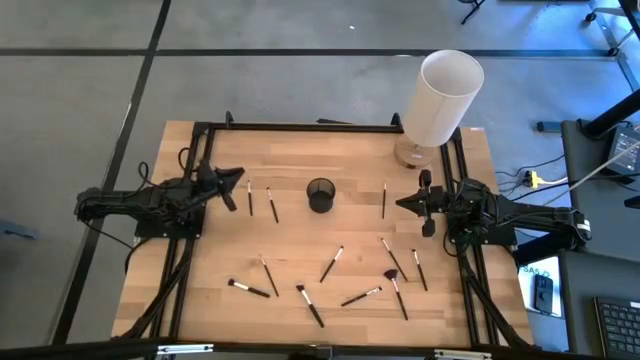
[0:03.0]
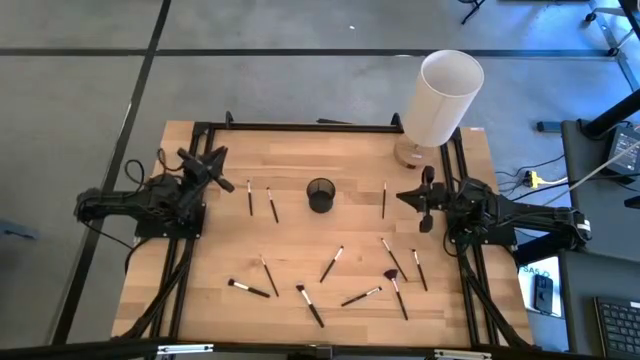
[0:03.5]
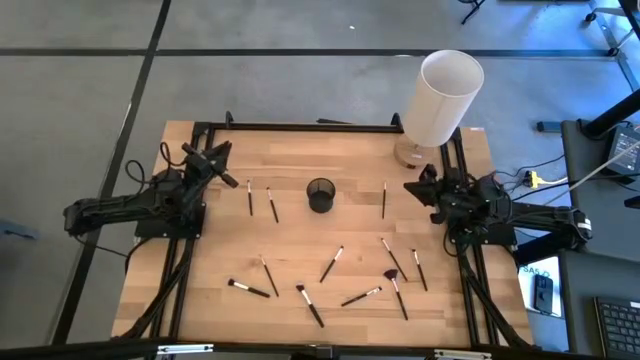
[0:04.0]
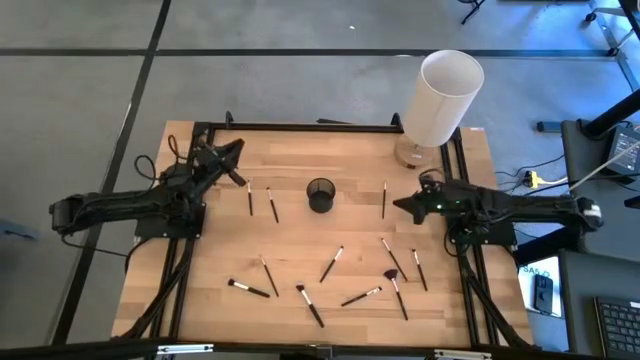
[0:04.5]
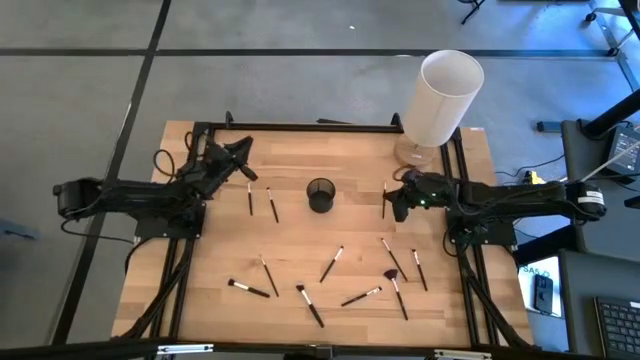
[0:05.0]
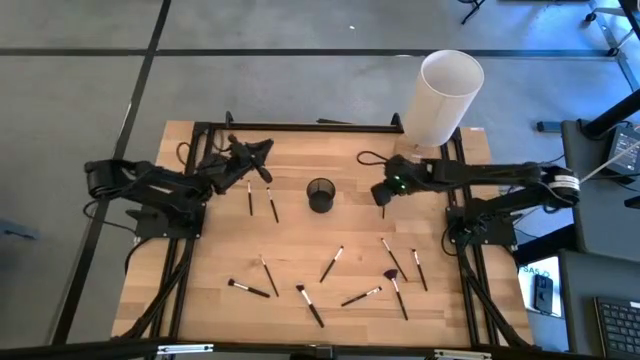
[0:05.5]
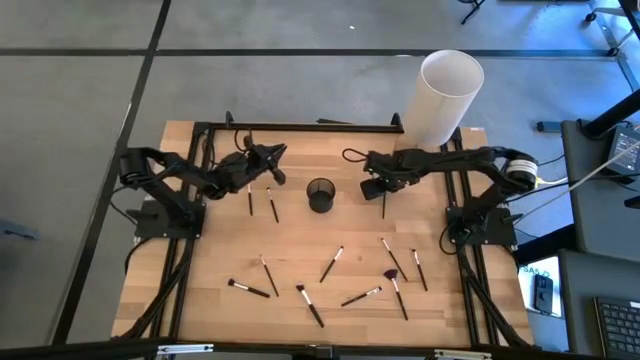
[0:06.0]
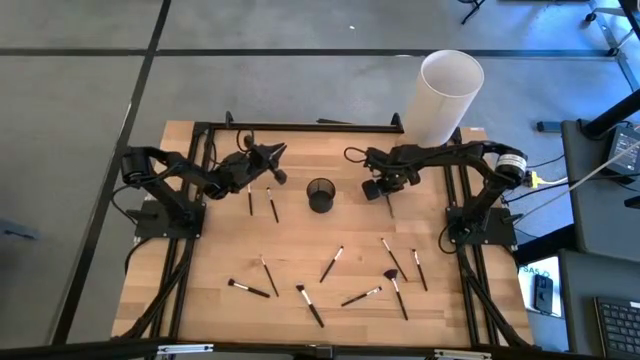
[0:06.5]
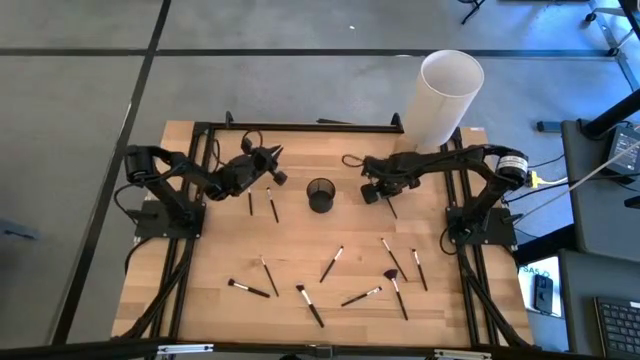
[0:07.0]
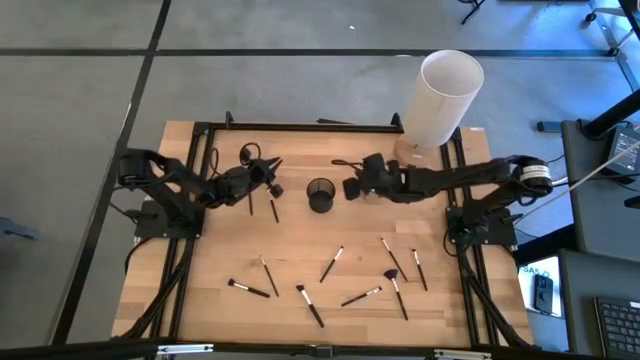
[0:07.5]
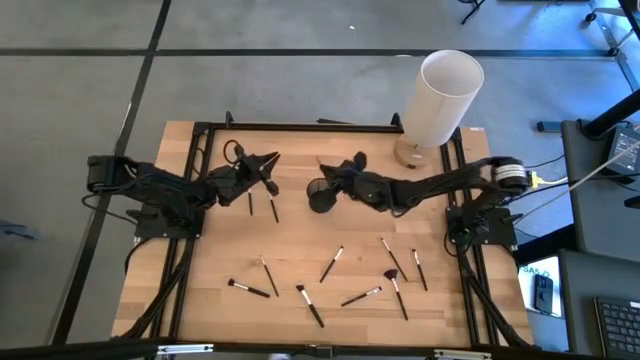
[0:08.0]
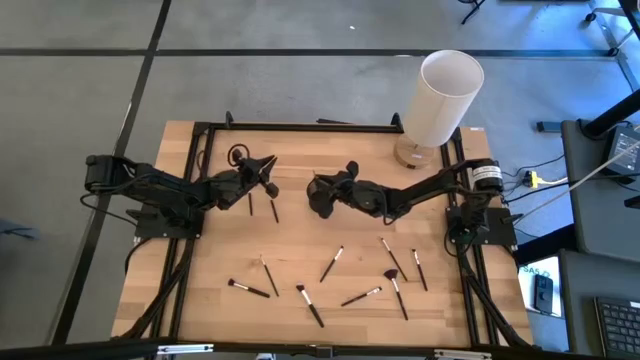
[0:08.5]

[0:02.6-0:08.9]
Task: Sort items
Put the eyeshadow brush into the organizer

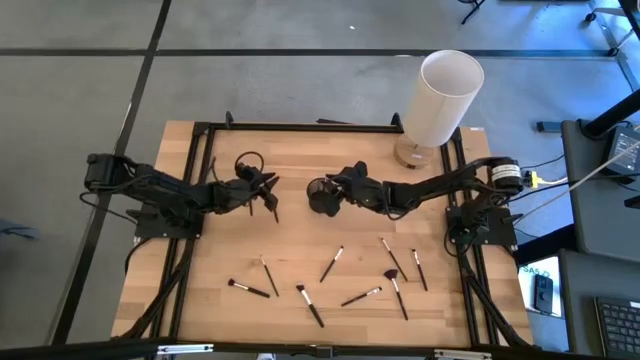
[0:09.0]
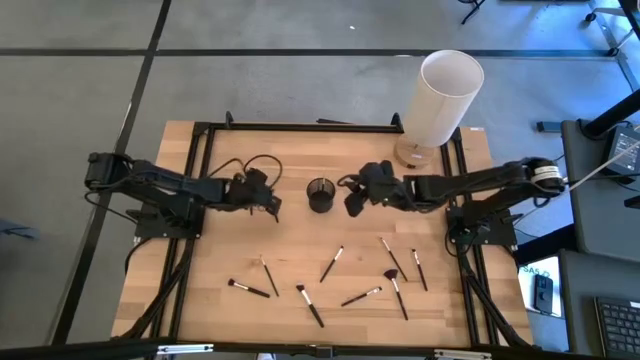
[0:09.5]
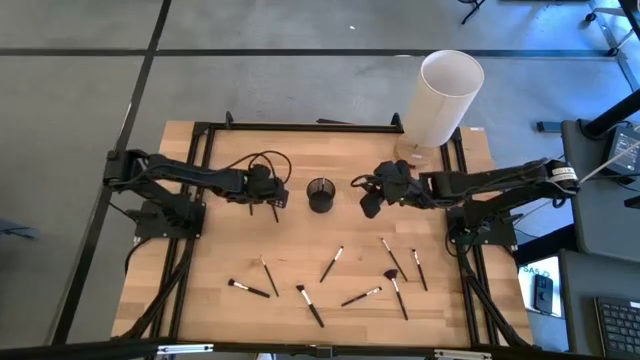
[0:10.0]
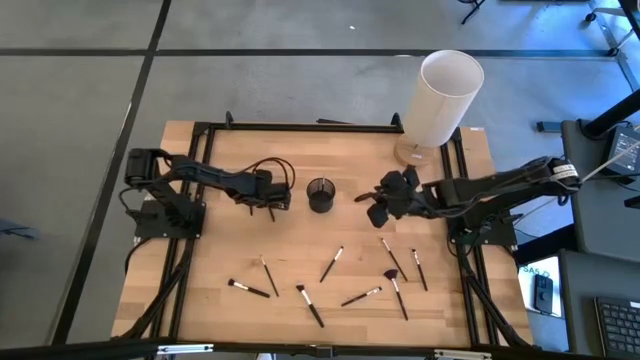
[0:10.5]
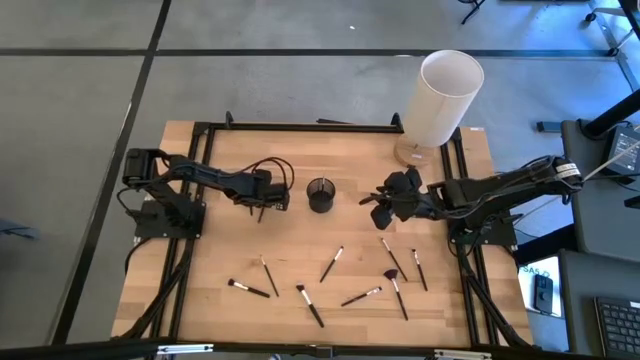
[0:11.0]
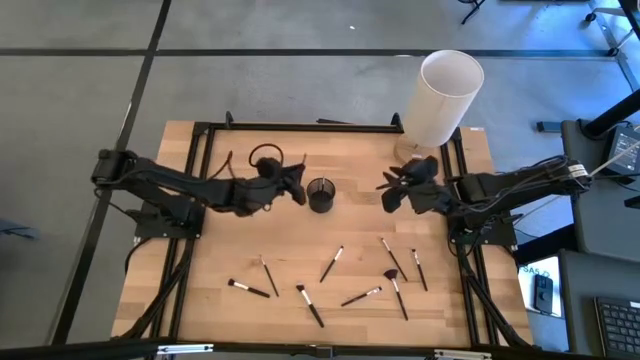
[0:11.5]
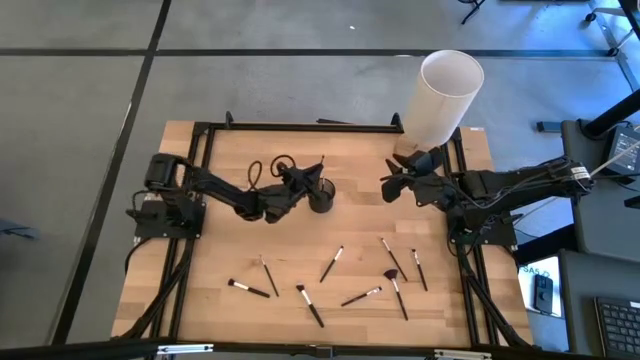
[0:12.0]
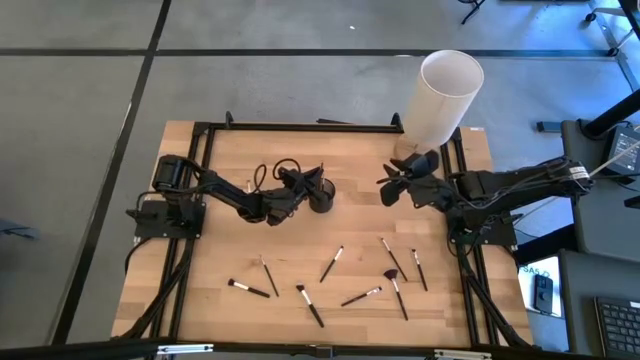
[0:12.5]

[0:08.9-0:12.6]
Put the eyeshadow brush into the organizer

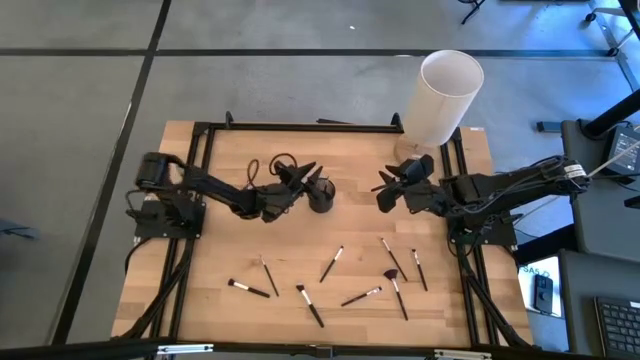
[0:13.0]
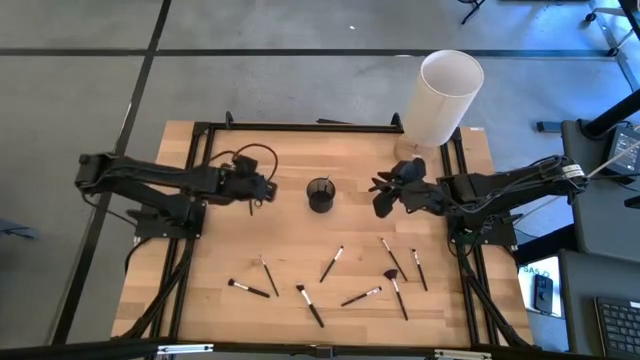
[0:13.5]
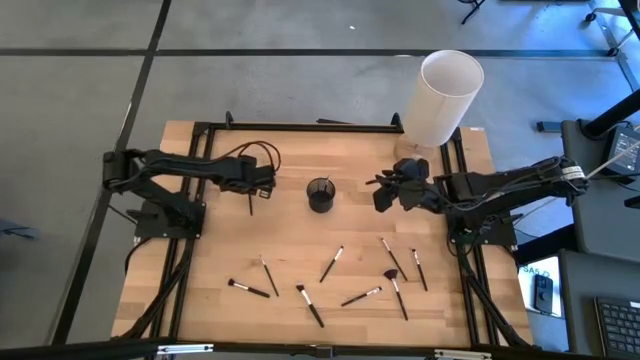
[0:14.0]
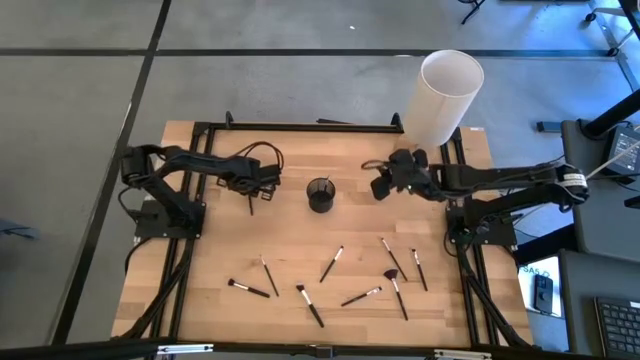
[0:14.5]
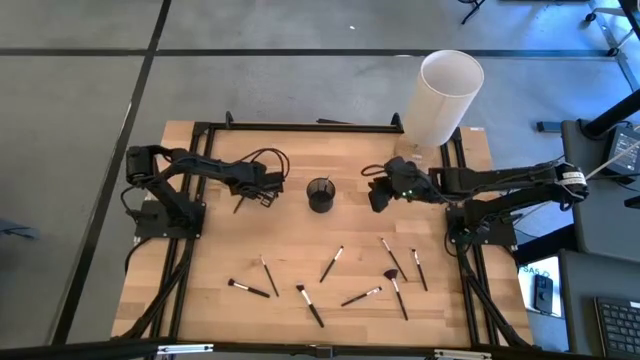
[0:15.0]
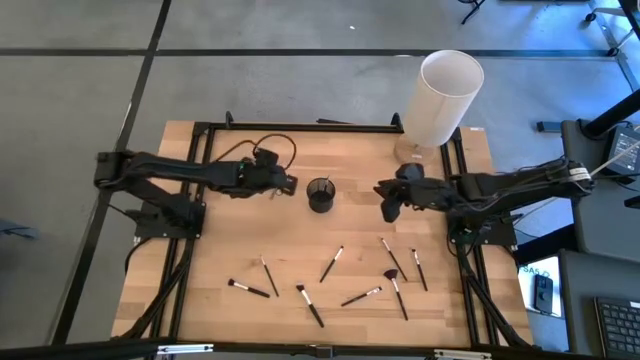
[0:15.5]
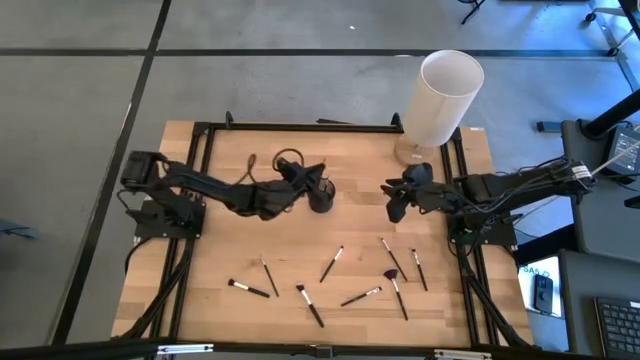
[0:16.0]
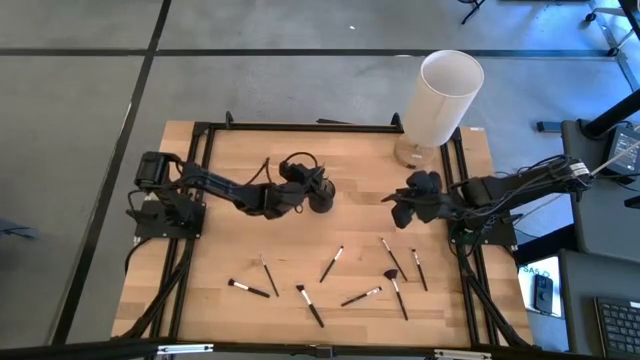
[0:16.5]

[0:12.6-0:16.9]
Put the eyeshadow brush into the organizer

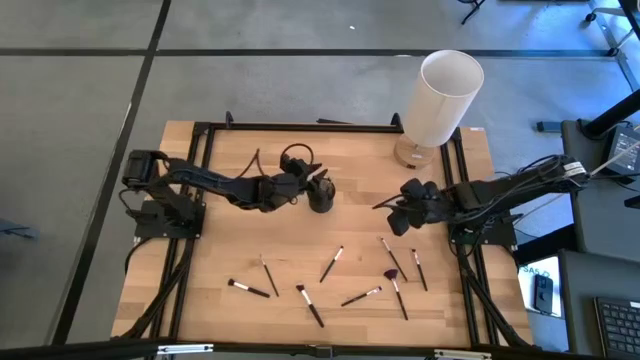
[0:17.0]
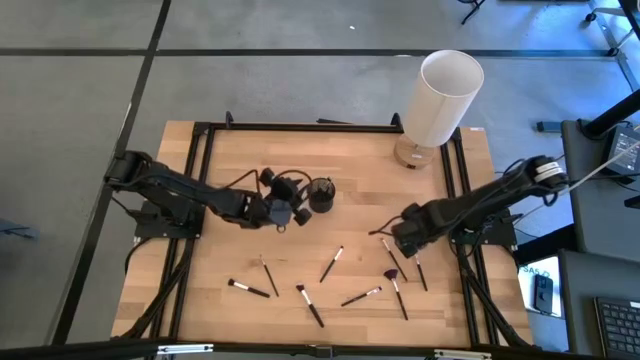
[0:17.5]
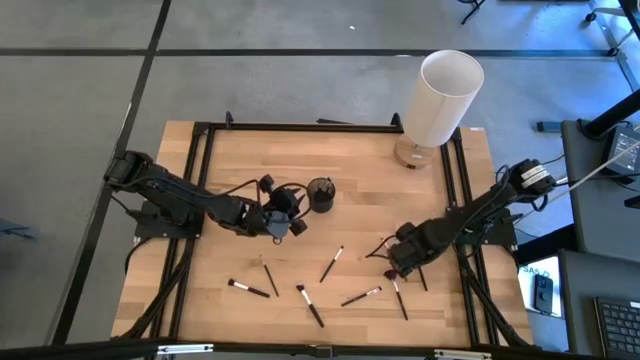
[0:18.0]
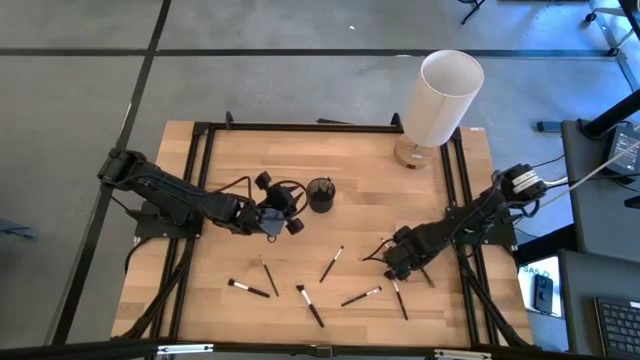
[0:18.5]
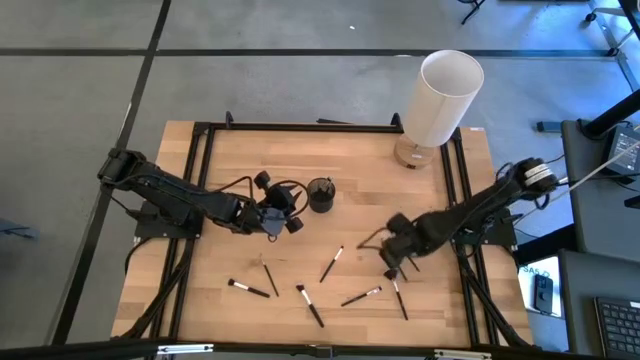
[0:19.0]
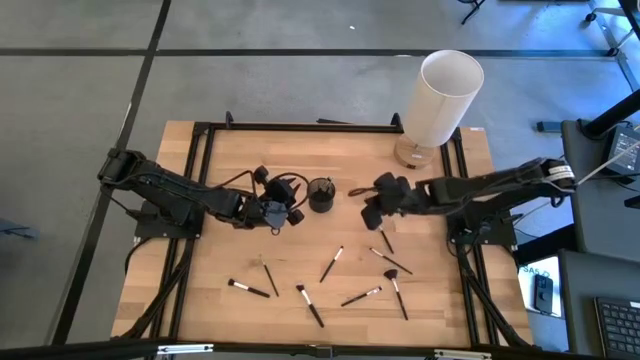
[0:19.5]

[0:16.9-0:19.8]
Put the eyeshadow brush into the organizer

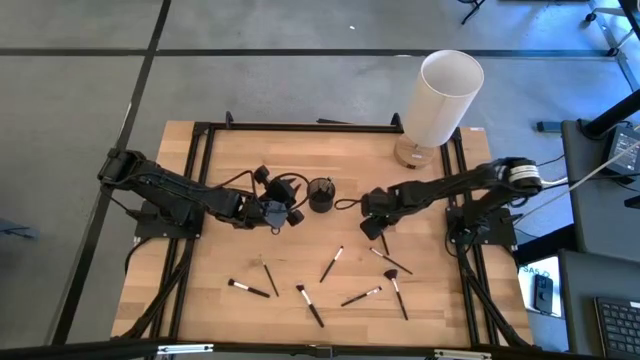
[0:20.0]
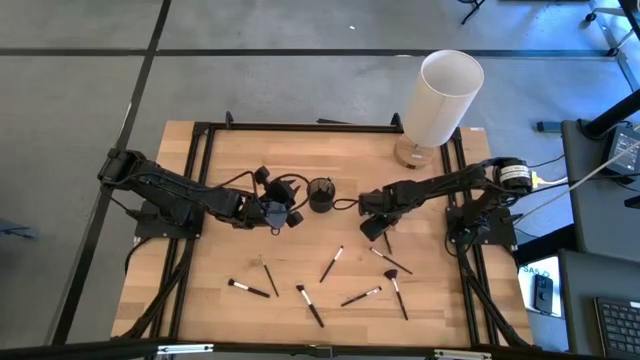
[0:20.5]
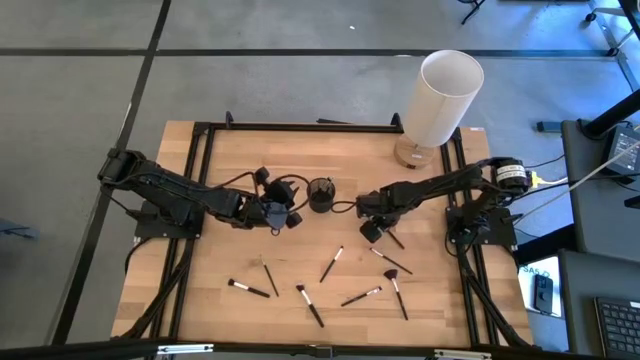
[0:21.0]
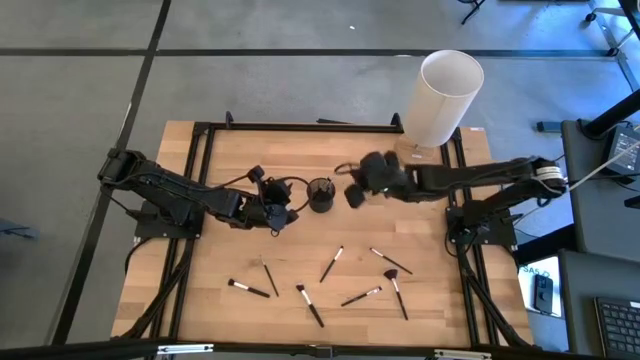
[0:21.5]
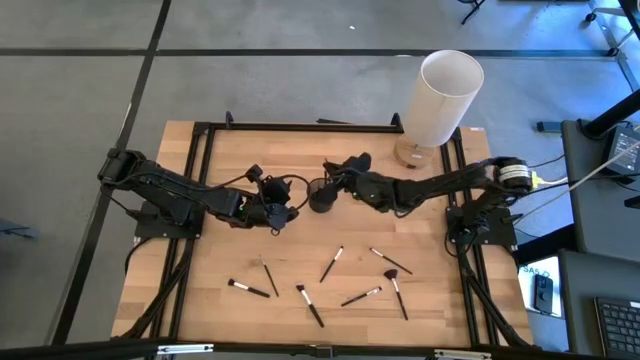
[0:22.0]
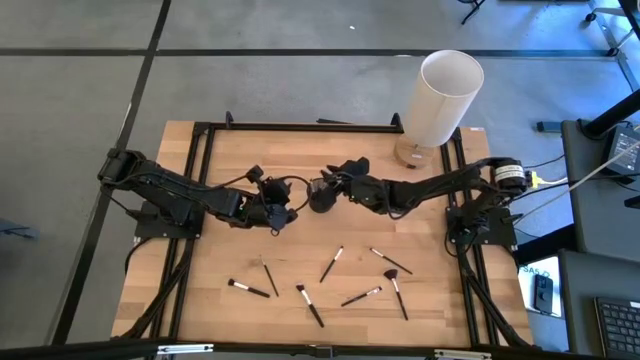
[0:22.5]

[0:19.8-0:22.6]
Put the eyeshadow brush into the organizer
